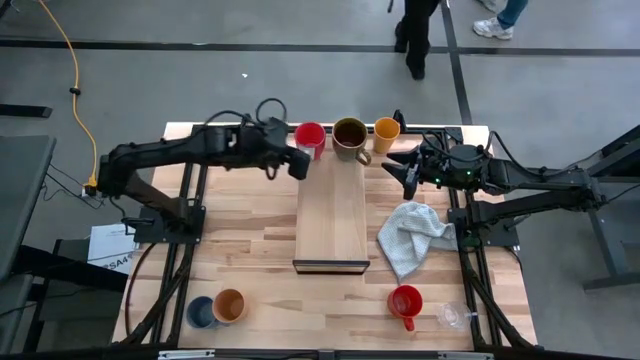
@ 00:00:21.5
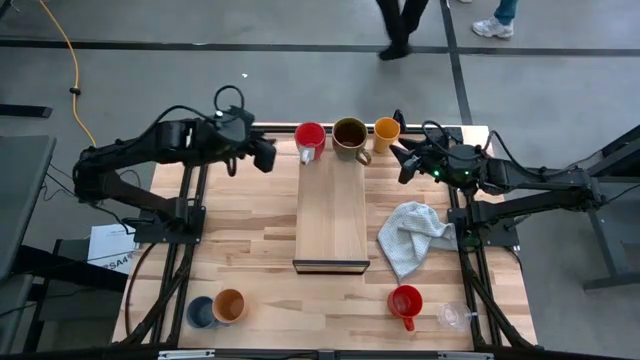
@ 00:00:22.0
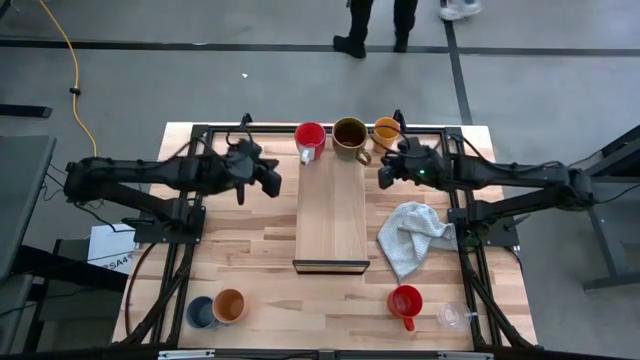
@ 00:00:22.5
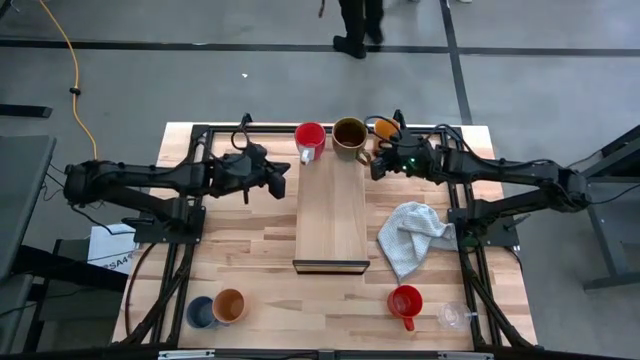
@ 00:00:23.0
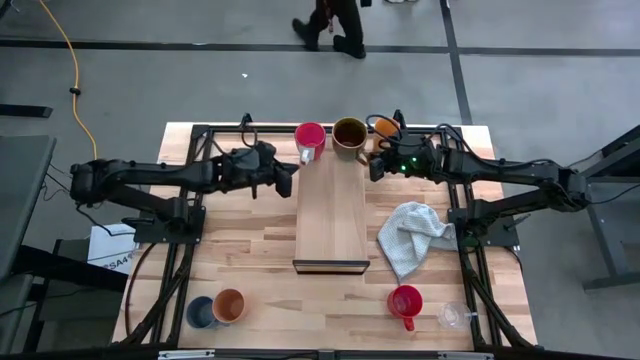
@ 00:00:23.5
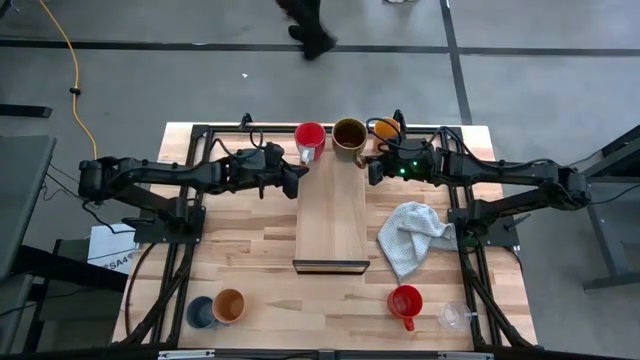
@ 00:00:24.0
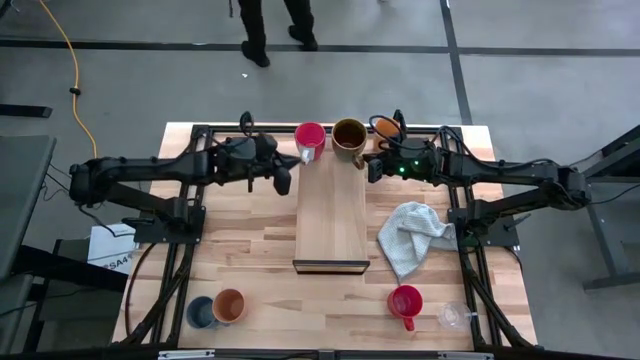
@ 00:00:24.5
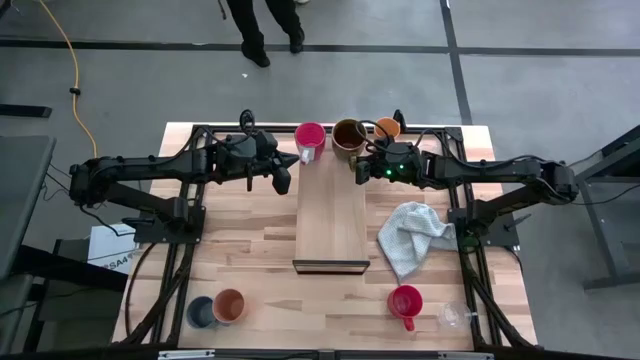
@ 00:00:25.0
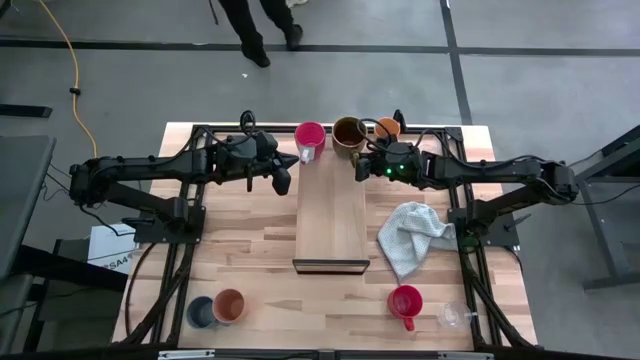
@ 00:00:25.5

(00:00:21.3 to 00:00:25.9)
Task: Stack small to large cups/mugs on shelf
Adjust the green mug on the shelf

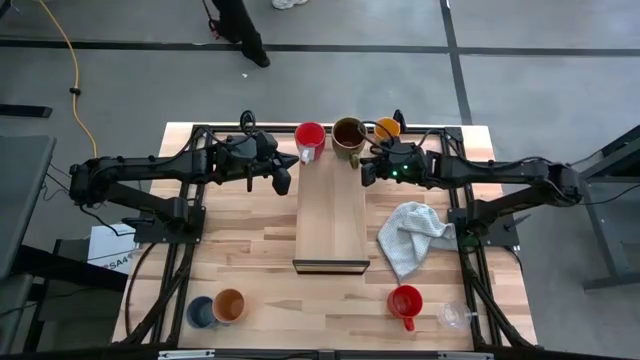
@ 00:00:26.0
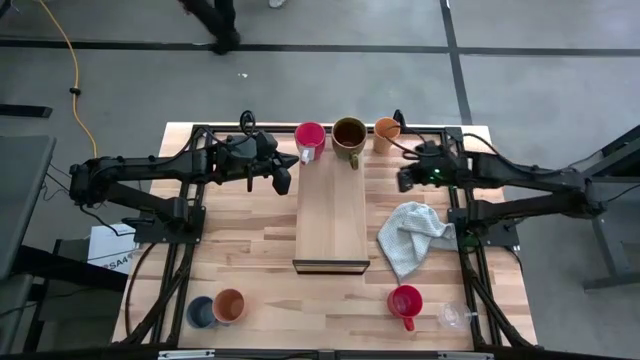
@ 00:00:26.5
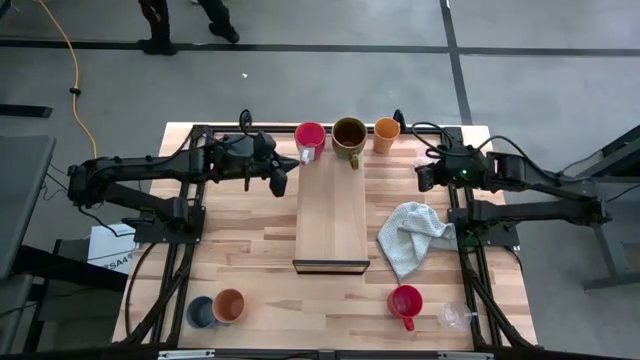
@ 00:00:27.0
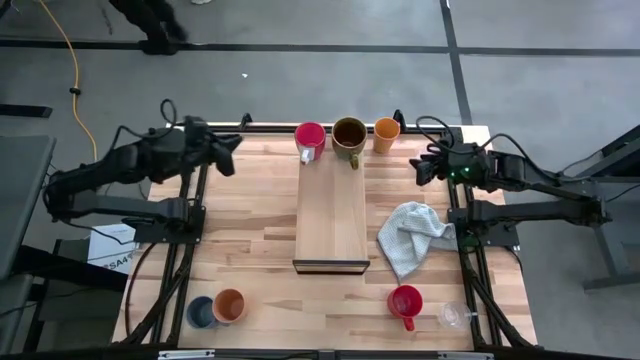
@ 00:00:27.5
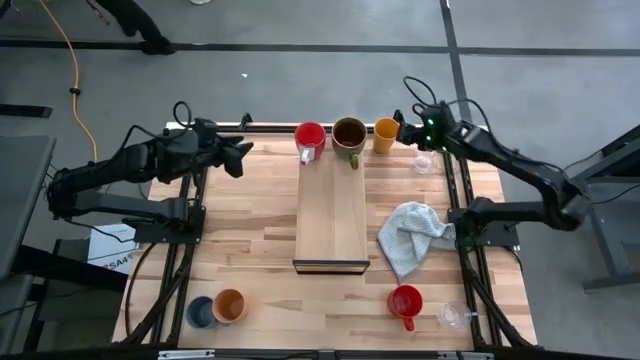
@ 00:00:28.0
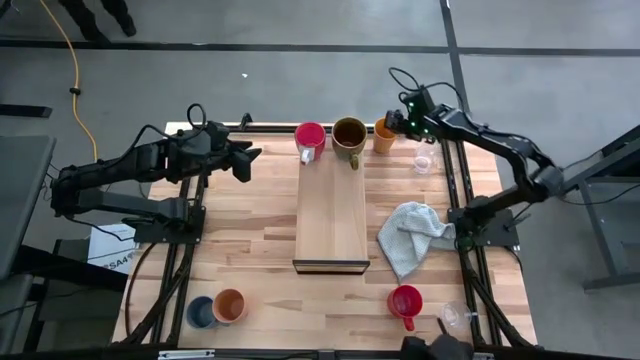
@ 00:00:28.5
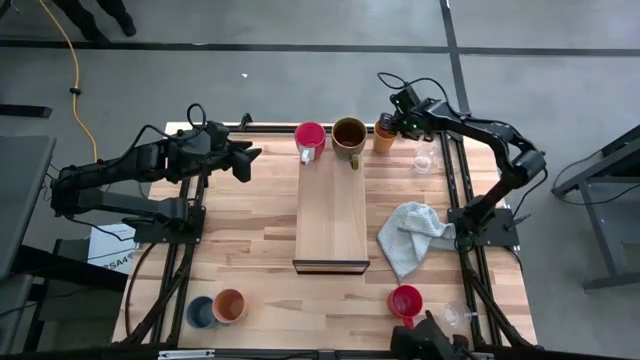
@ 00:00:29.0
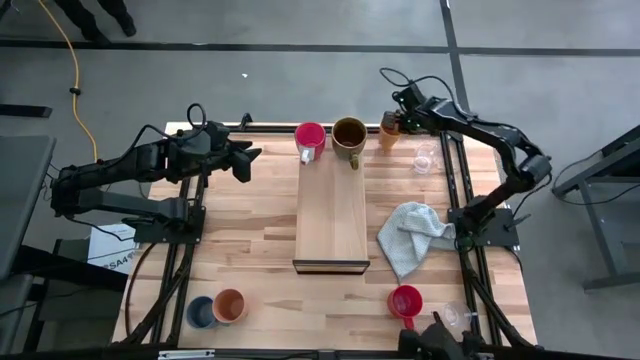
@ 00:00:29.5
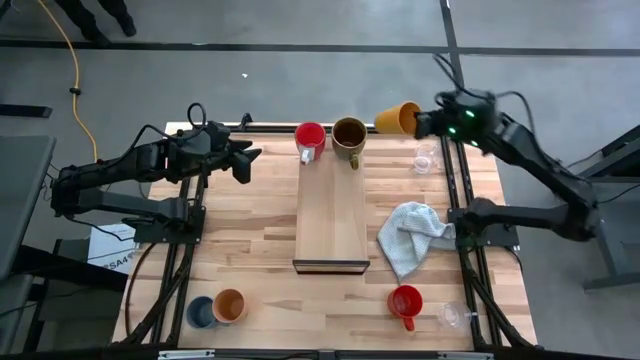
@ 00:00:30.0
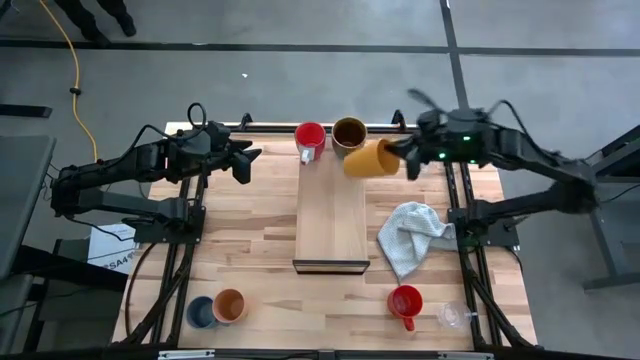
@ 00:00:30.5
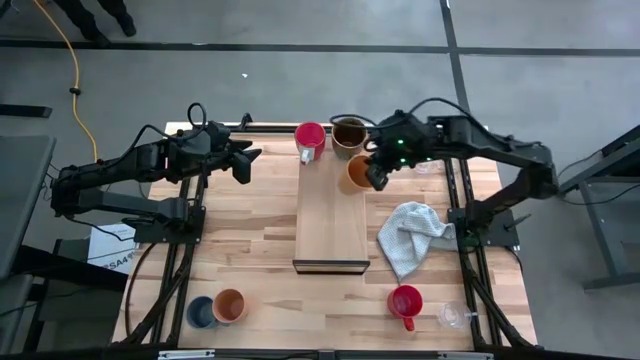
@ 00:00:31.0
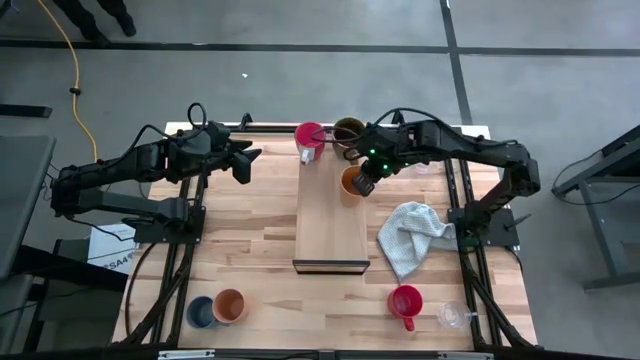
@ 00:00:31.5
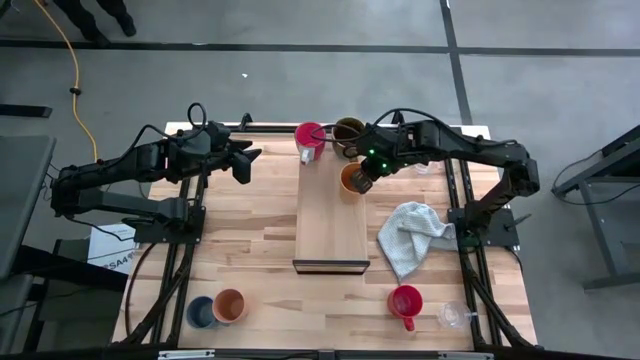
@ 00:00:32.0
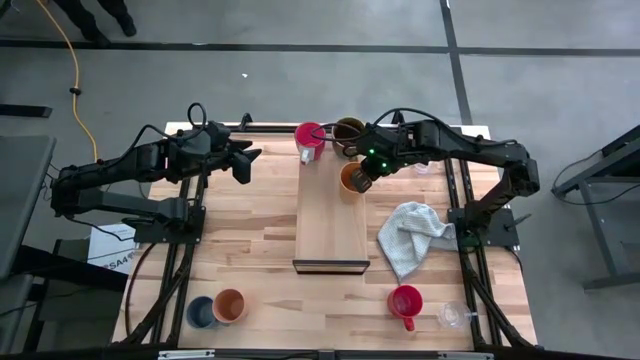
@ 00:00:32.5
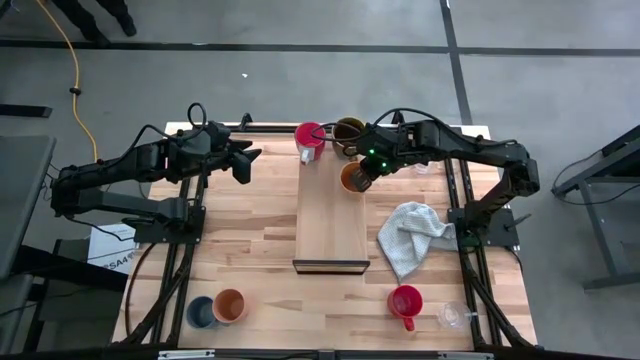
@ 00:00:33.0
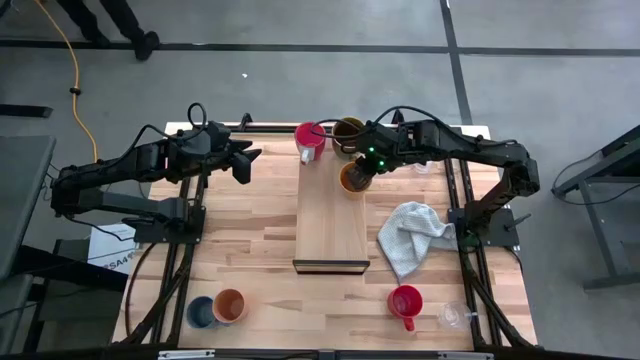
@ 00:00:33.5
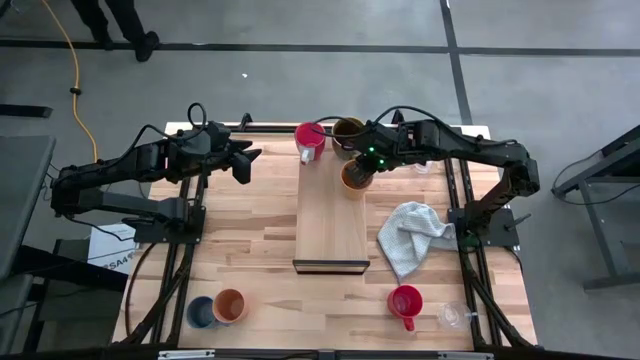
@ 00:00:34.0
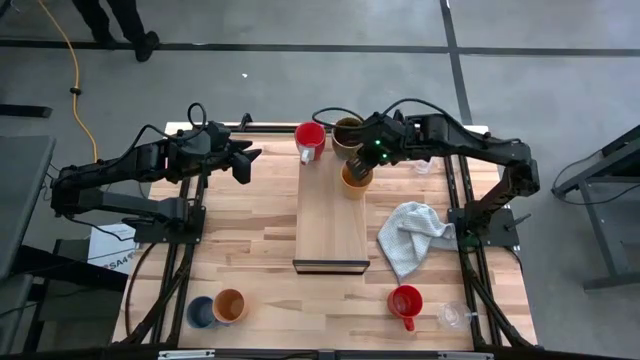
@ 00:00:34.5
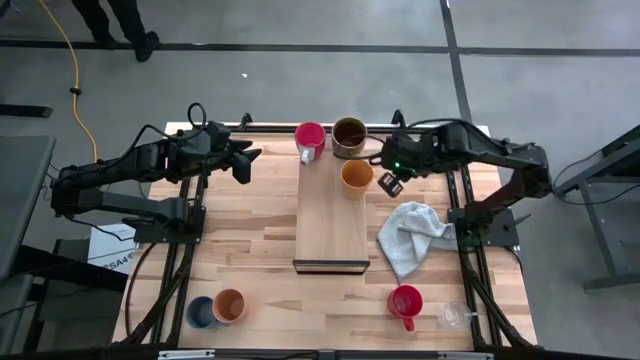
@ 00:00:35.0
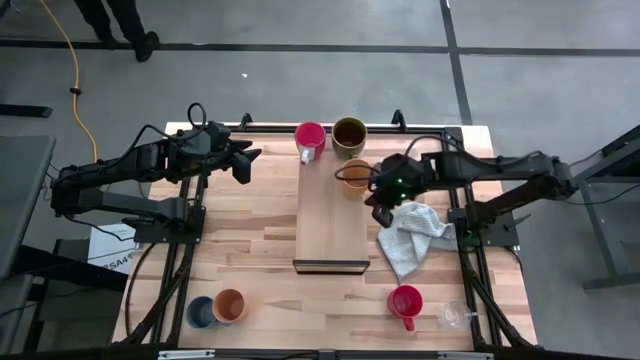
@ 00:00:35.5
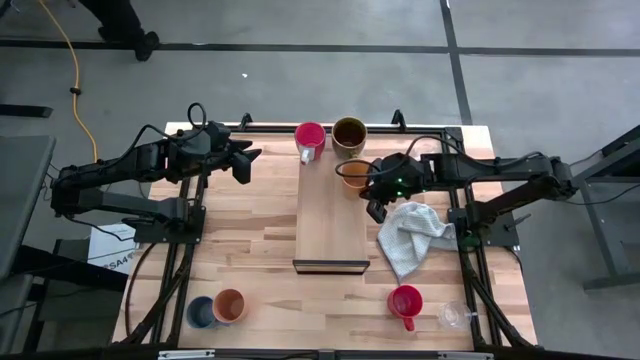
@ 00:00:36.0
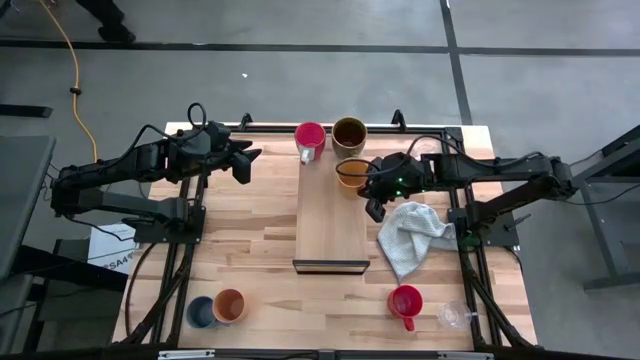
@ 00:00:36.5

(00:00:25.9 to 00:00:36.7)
Put the yellow cup on the shelf

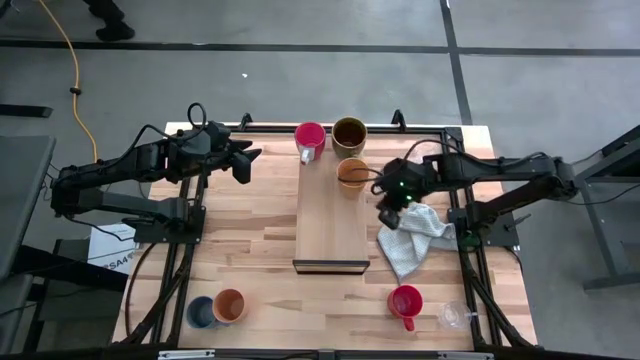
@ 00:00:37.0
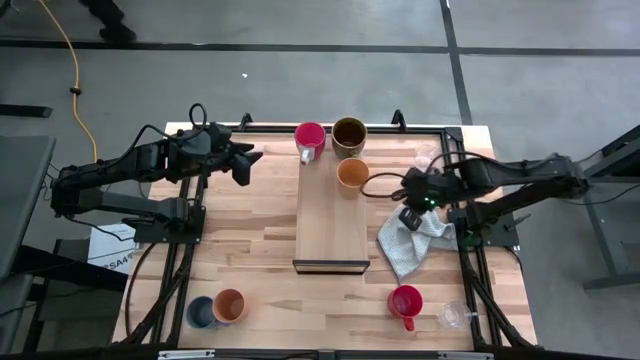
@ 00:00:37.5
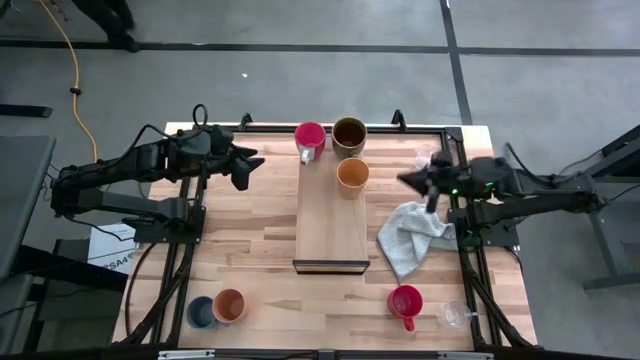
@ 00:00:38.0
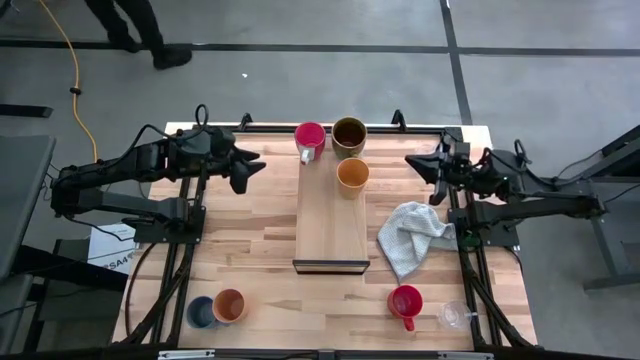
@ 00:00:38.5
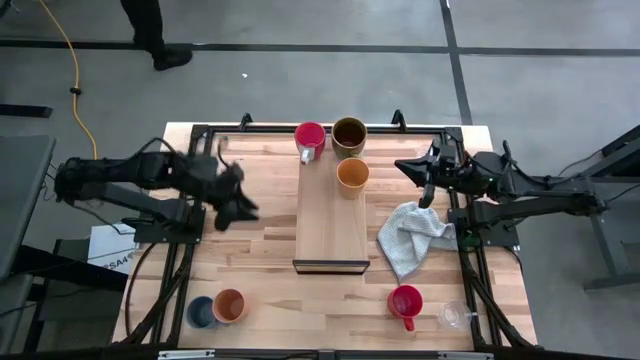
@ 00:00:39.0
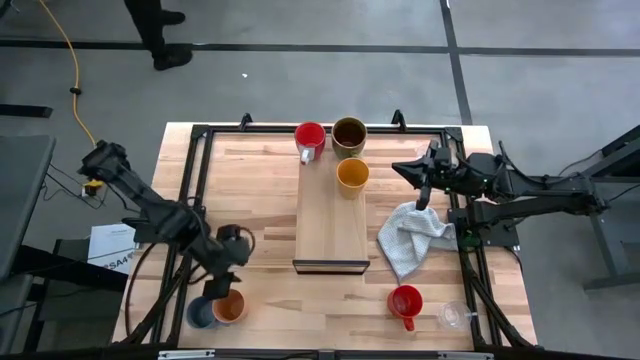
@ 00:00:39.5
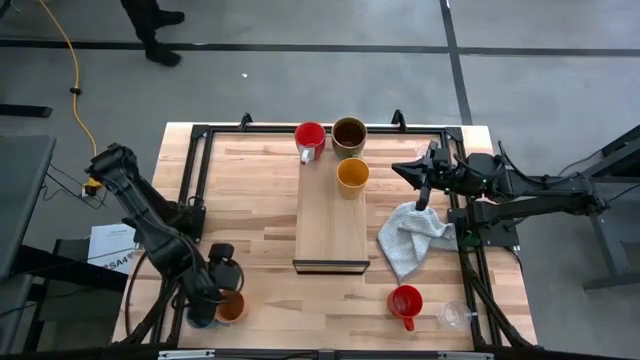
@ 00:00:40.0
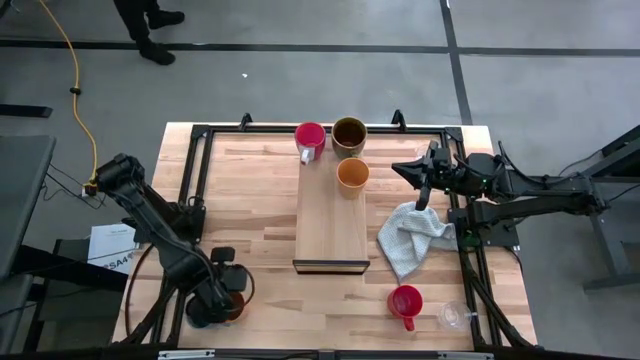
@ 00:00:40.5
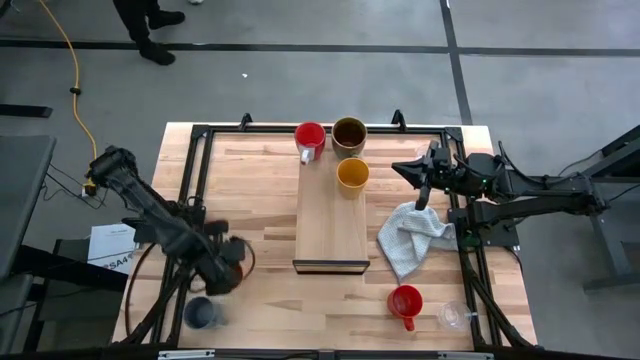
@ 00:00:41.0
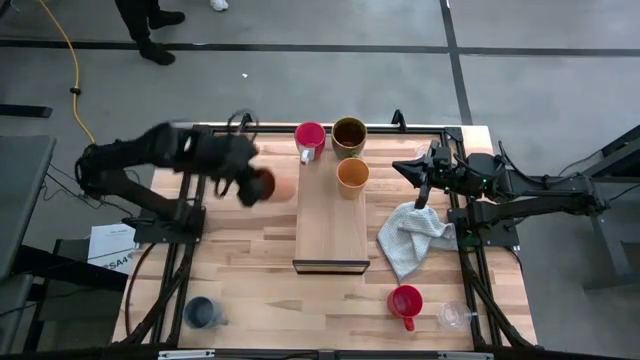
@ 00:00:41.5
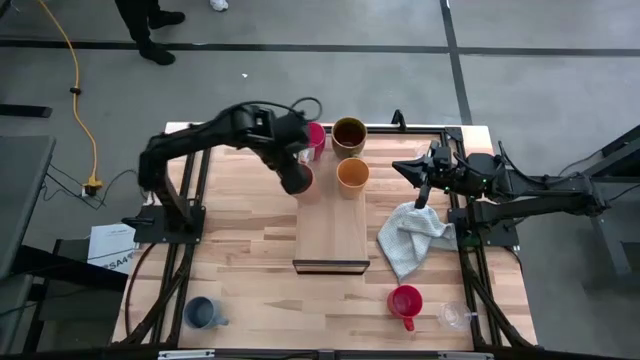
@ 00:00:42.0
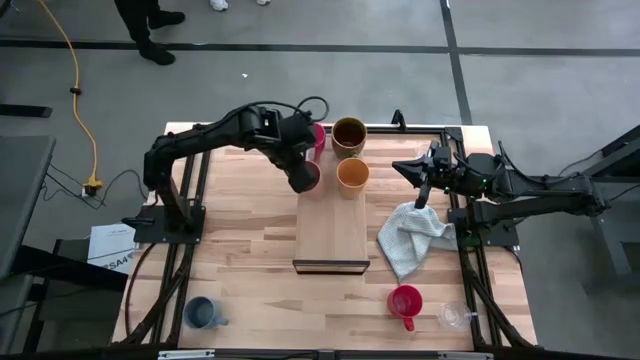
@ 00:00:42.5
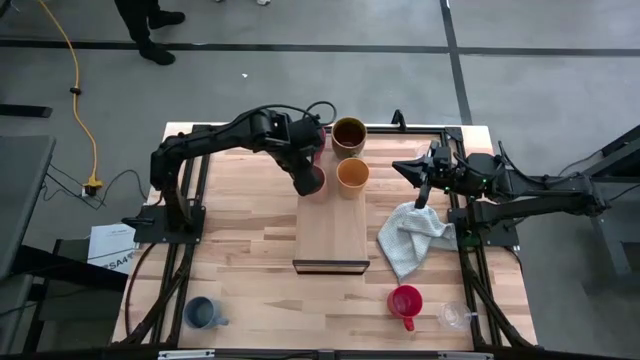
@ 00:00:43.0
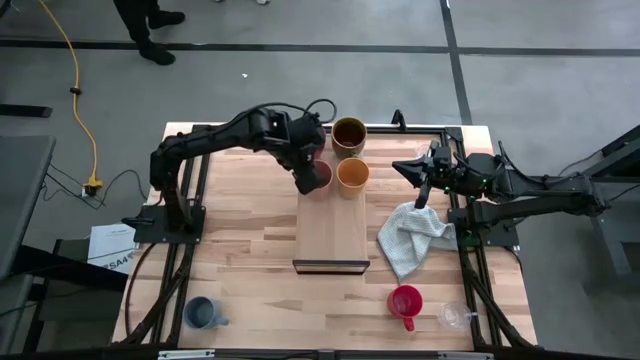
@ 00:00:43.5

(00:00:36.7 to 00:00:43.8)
Put the brown cup on the shelf
